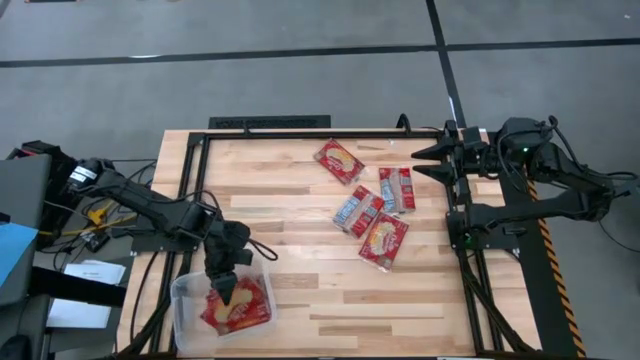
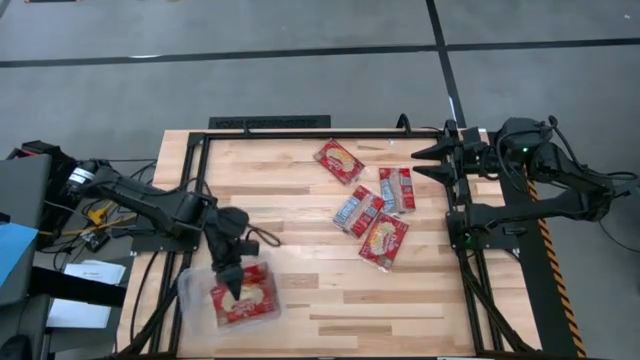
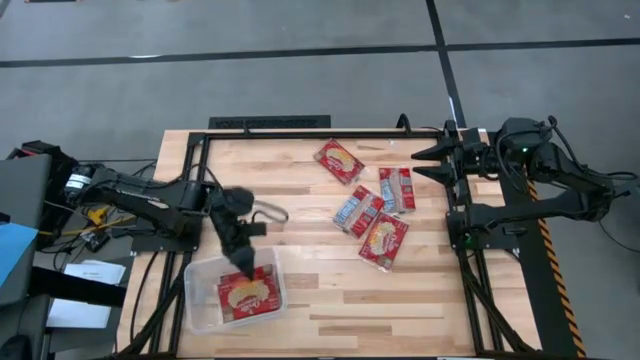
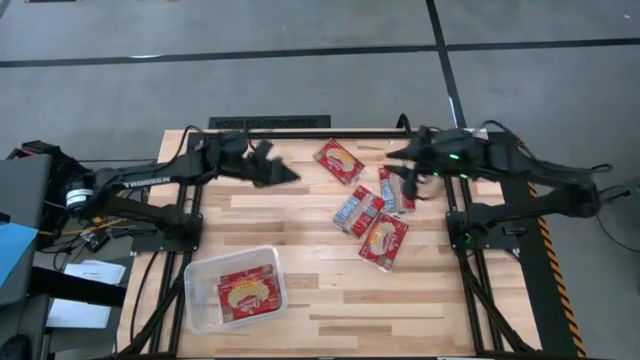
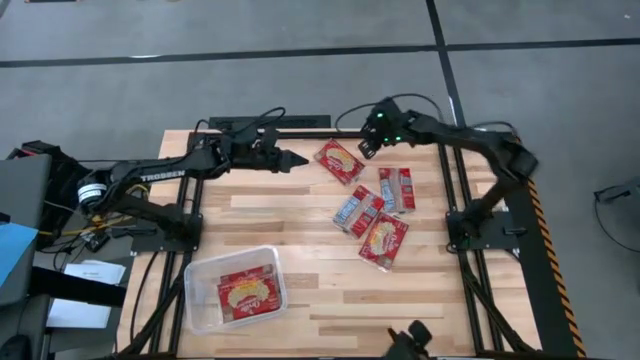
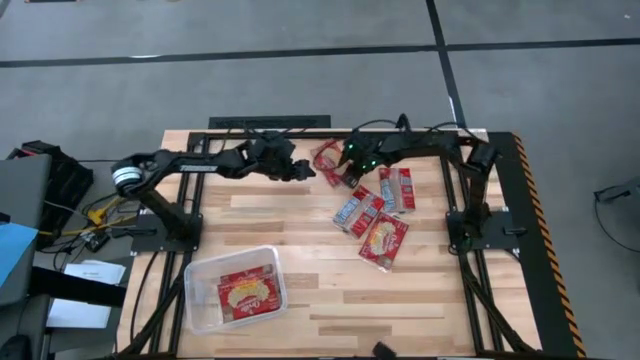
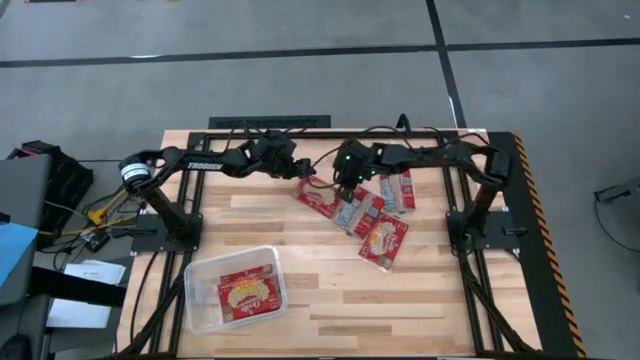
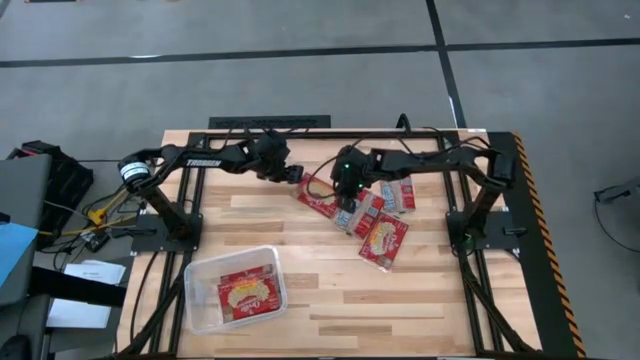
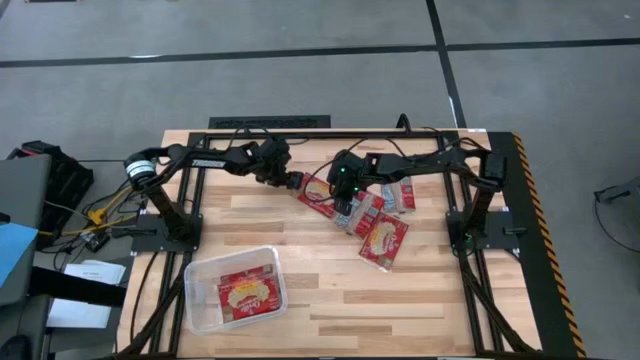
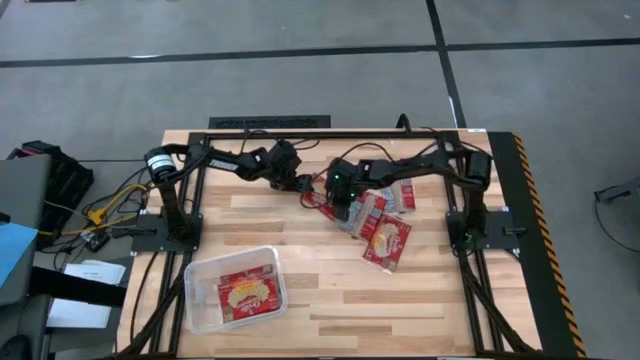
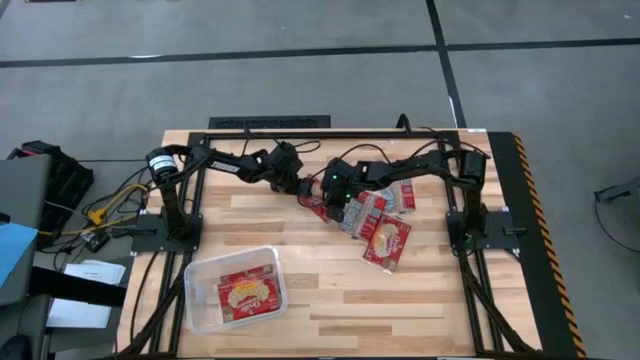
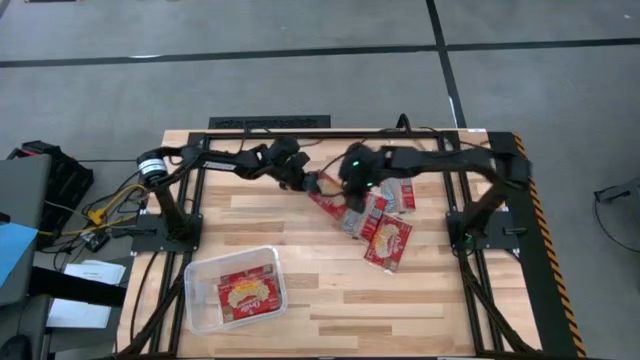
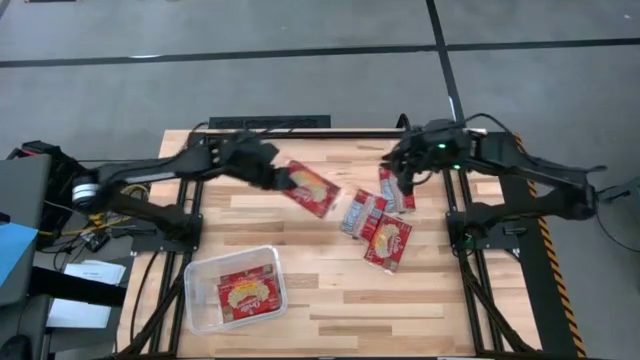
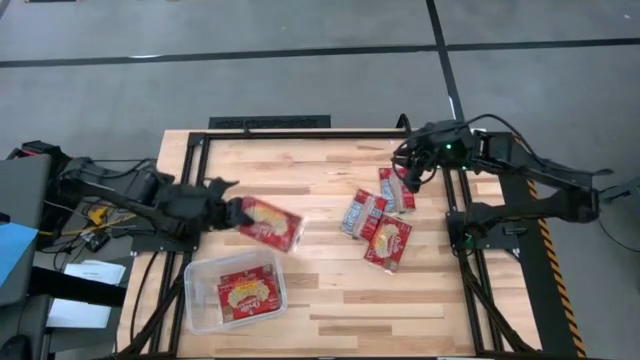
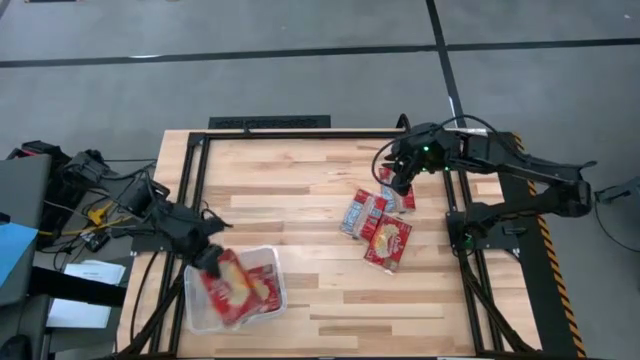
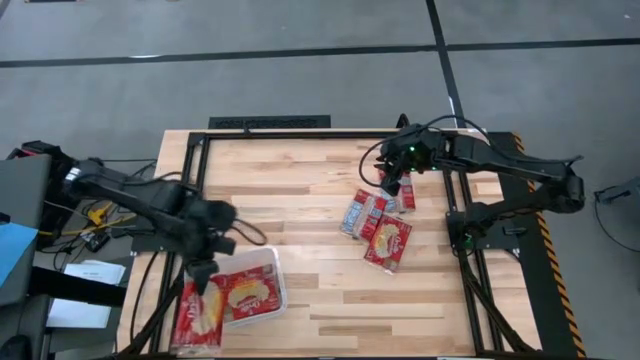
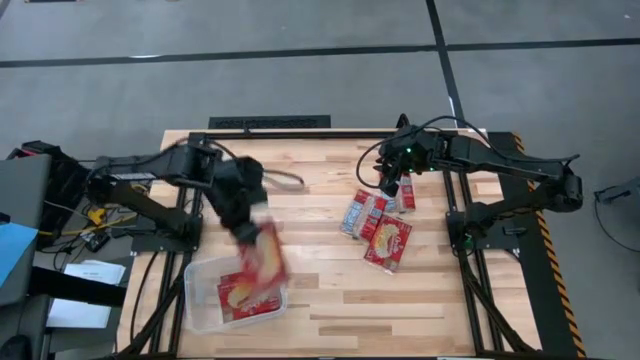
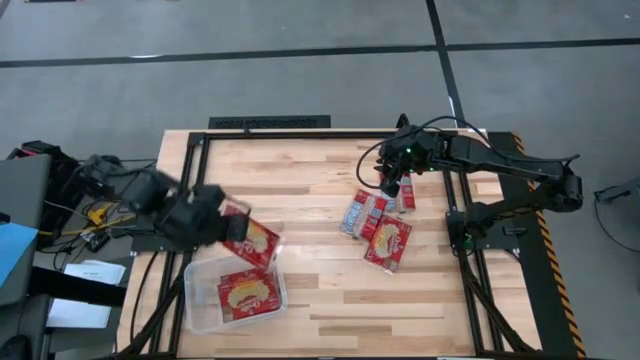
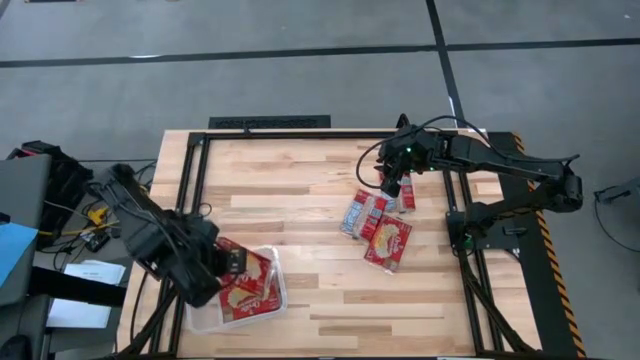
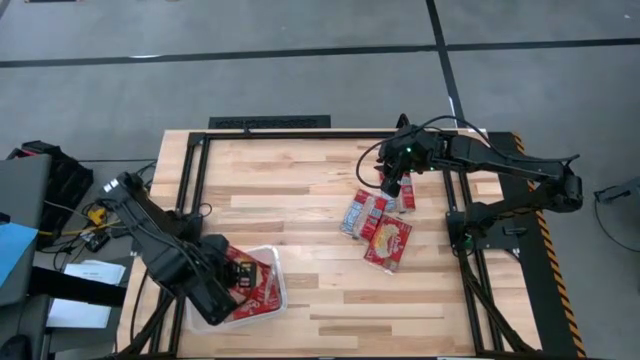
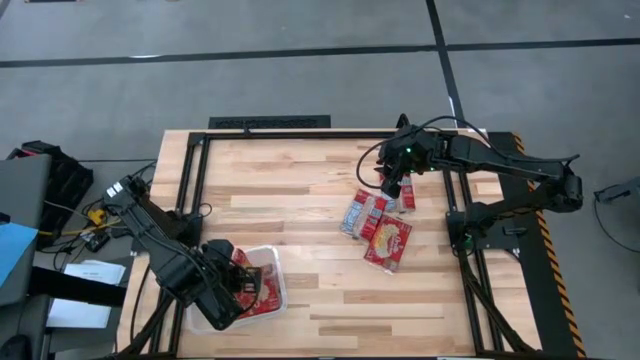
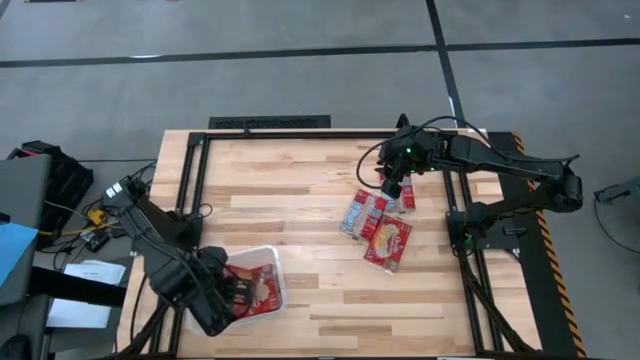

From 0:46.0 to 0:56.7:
Task: Sort popcorn bags into baskets
Put the red popcorn bag into the transparent bin

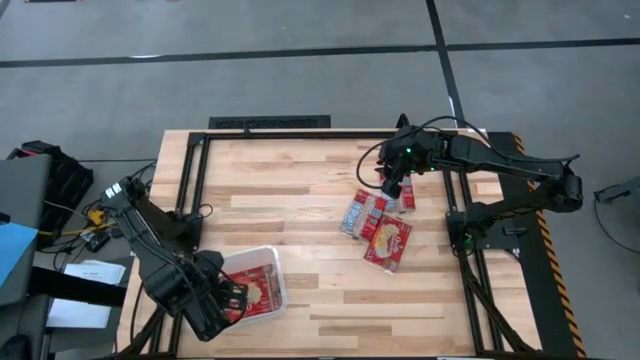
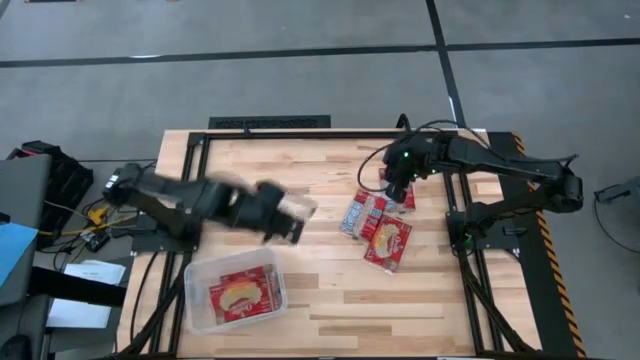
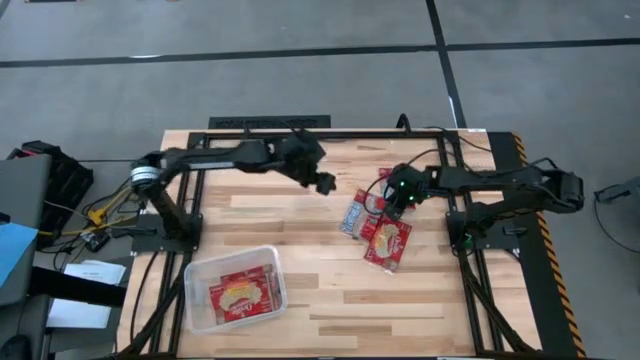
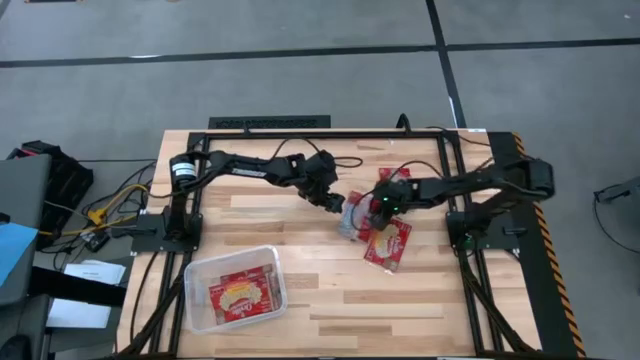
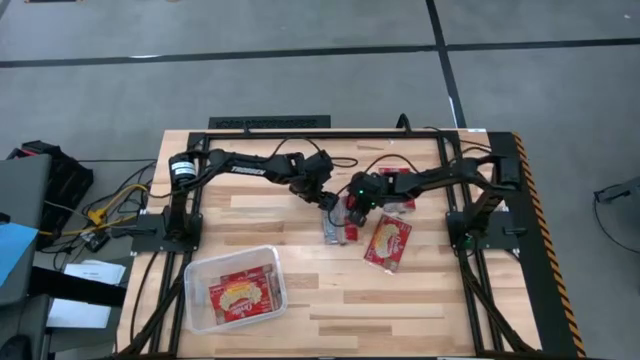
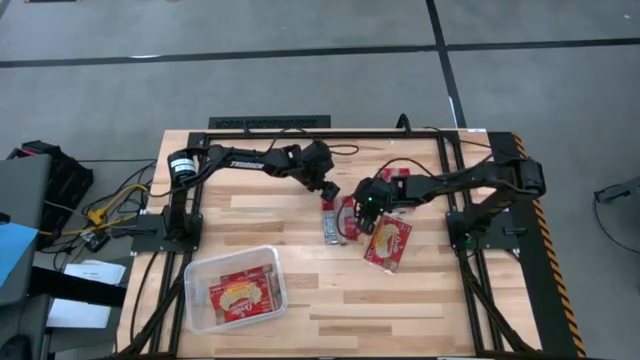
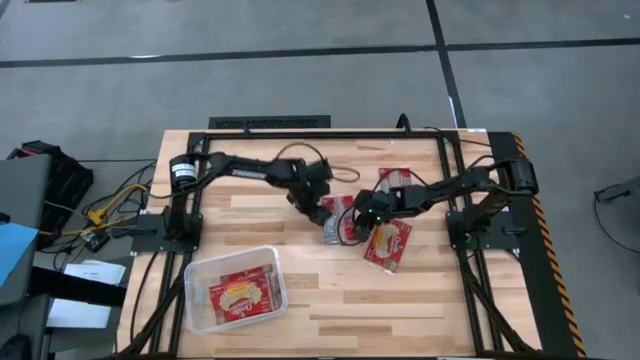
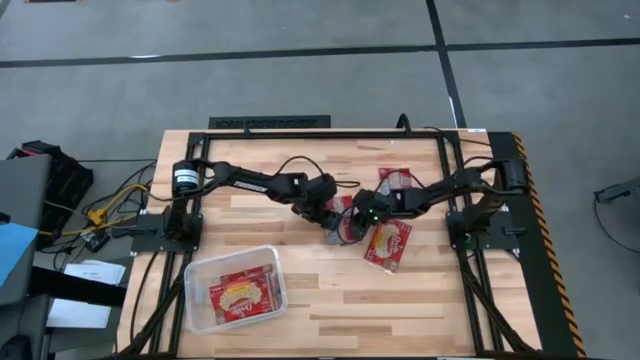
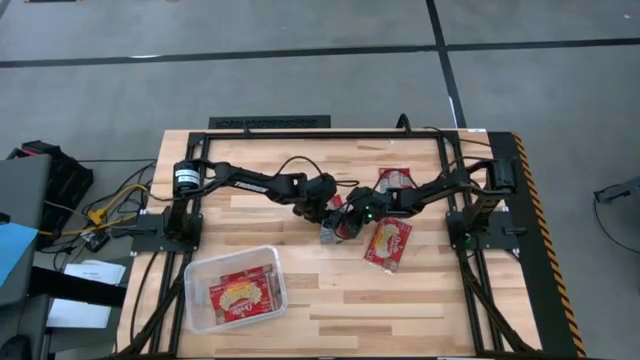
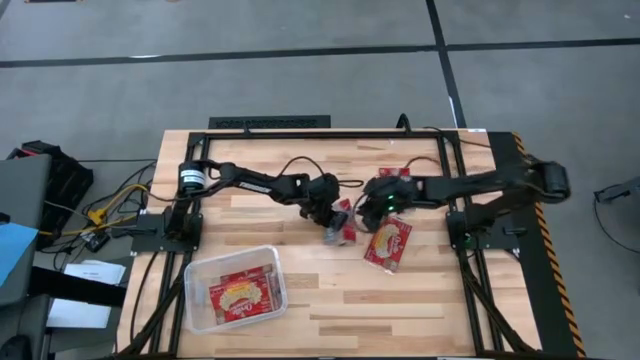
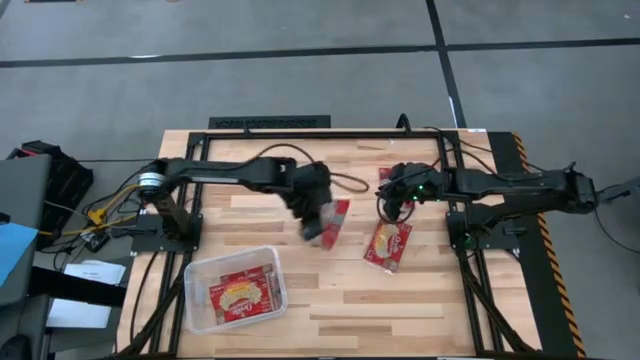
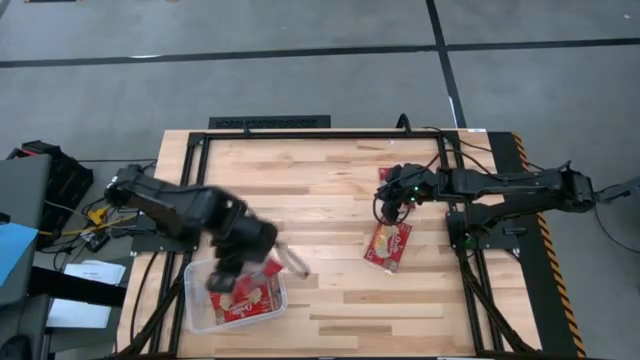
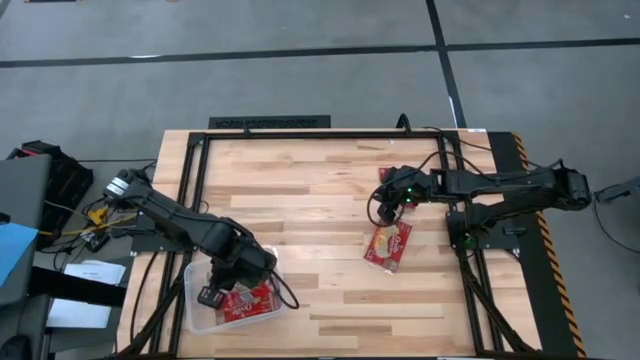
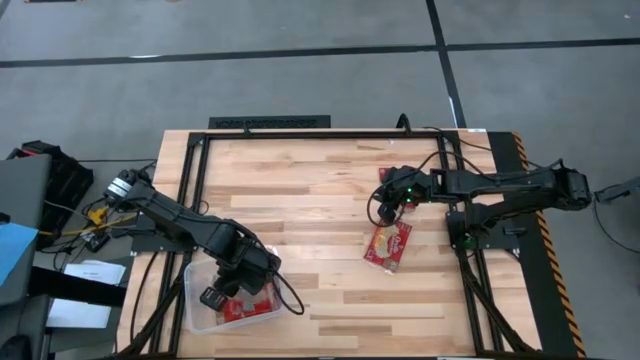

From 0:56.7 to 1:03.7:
Put the red popcorn bag into the transparent bin

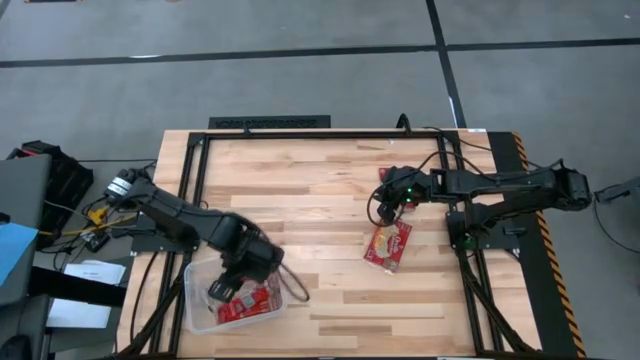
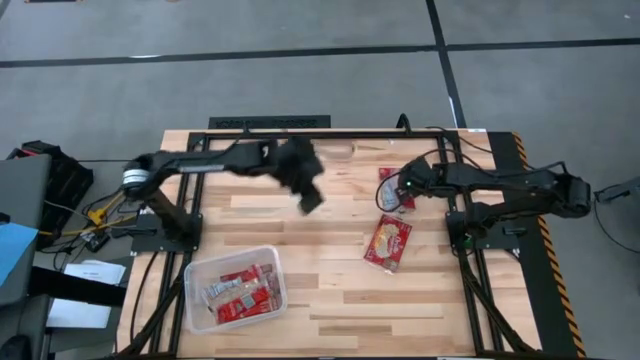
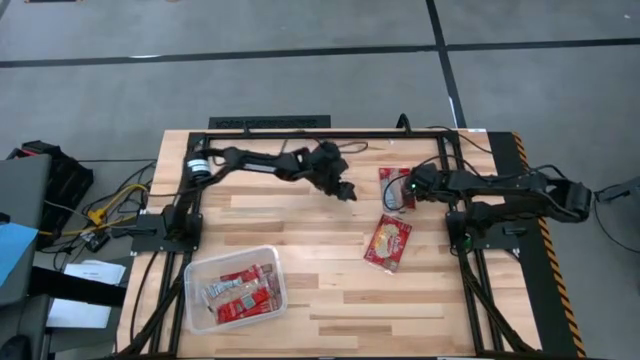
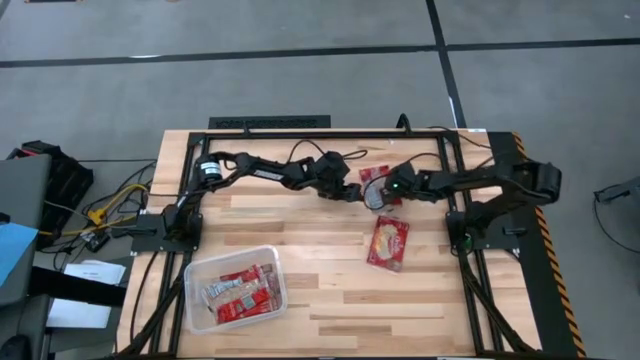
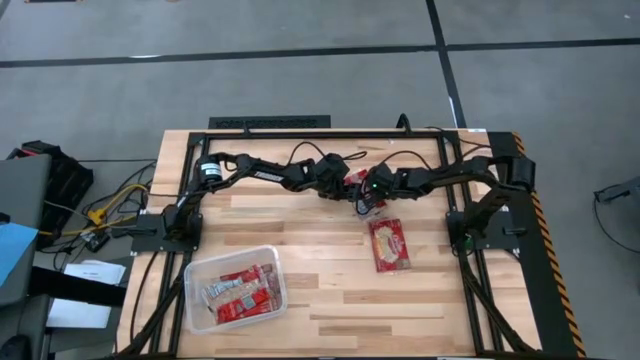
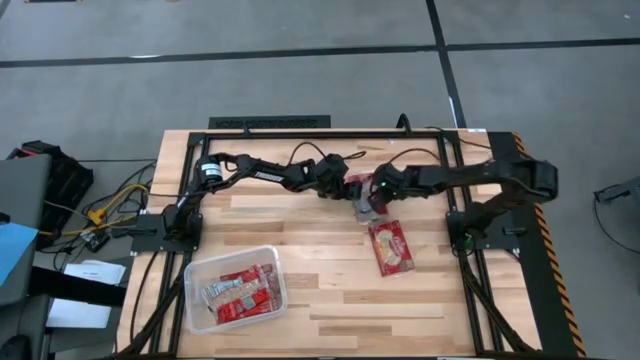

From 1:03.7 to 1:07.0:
Put the red popcorn bag into the transparent bin

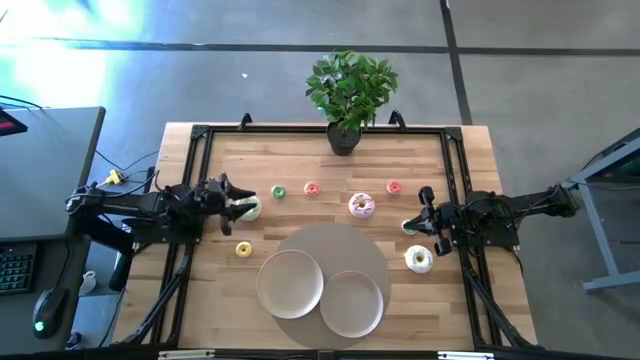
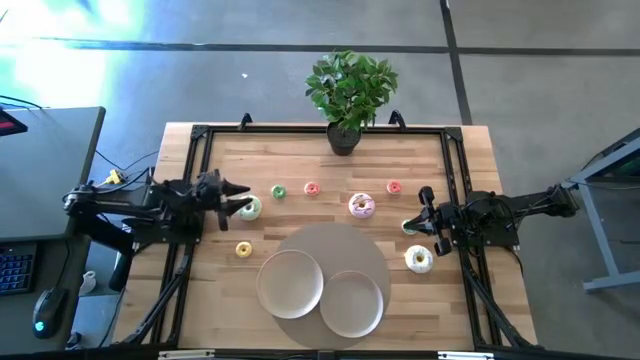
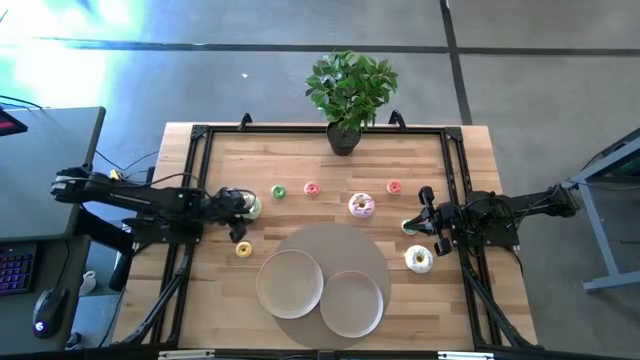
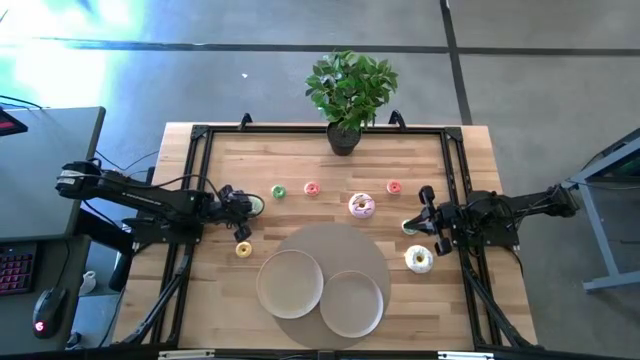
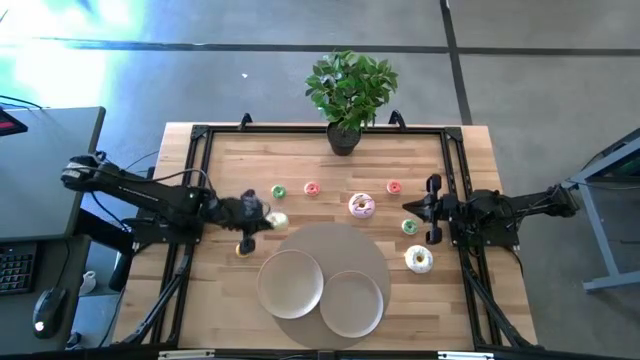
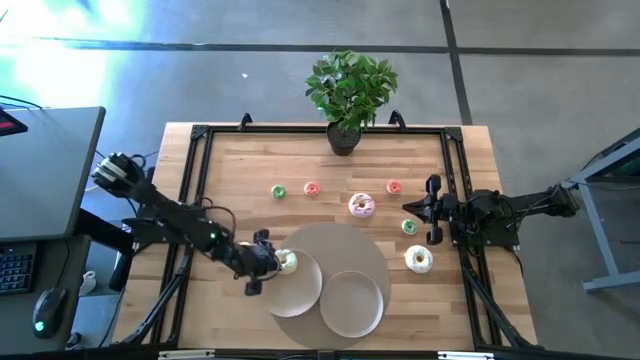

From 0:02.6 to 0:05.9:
Task: Pick & Place donuts
Put the large green donut on the left white plate
